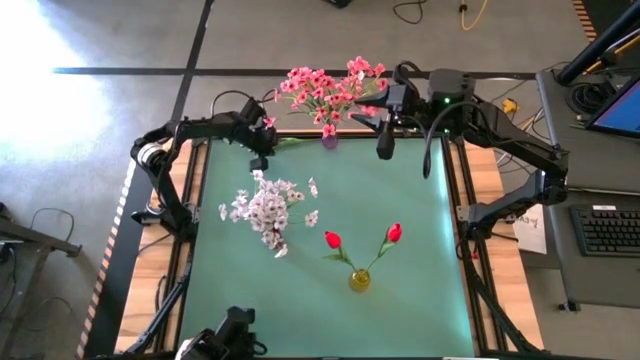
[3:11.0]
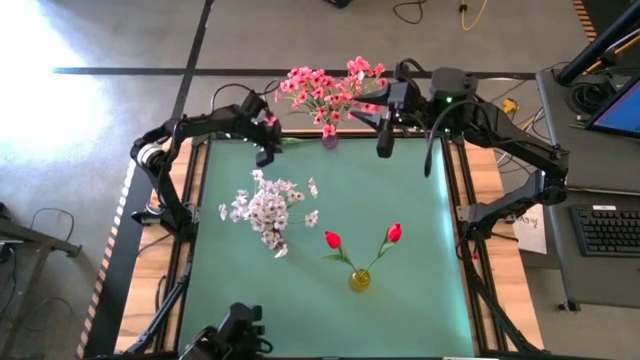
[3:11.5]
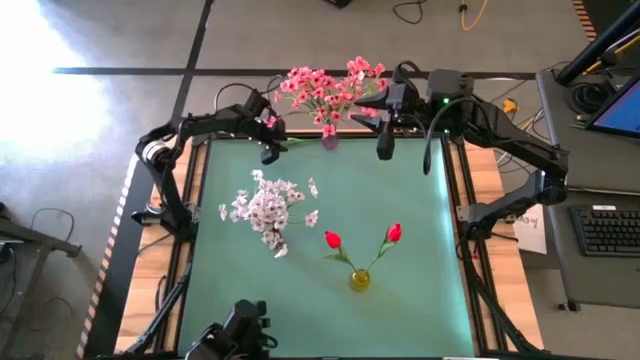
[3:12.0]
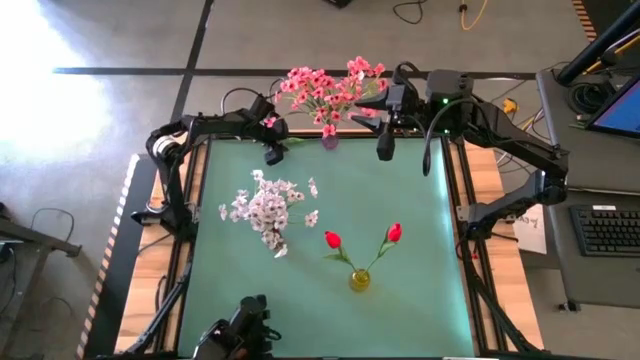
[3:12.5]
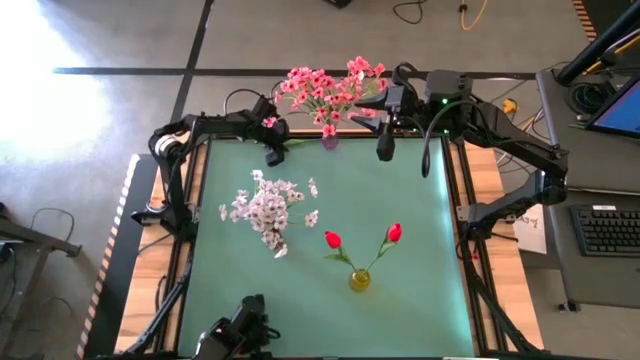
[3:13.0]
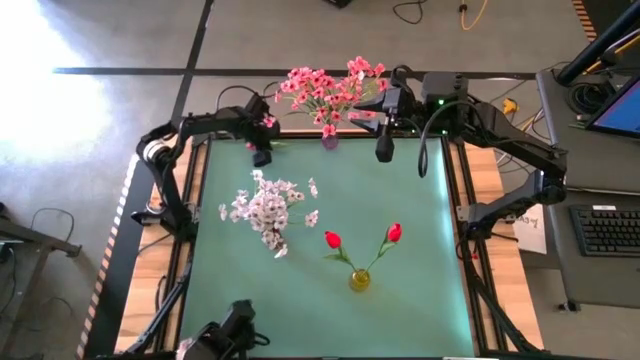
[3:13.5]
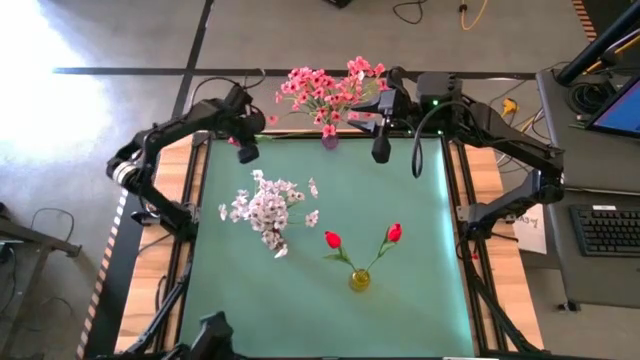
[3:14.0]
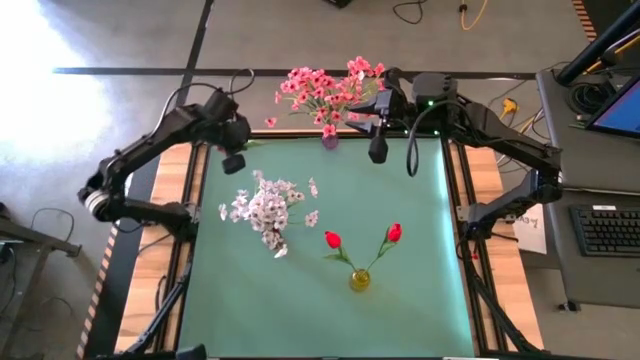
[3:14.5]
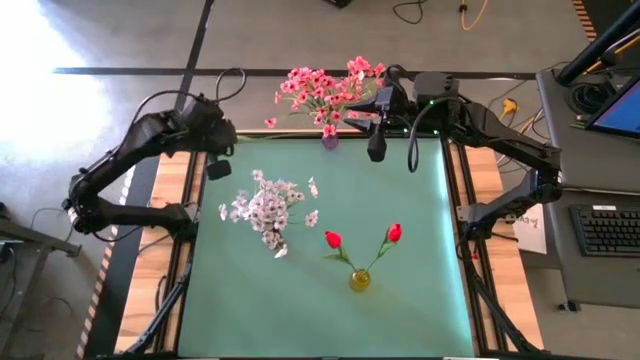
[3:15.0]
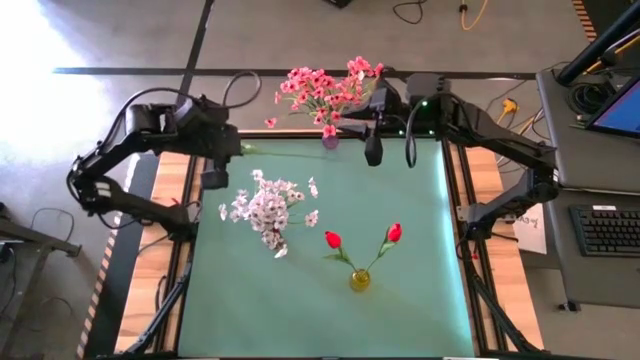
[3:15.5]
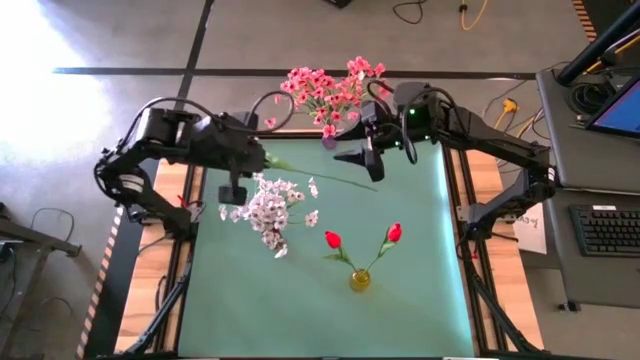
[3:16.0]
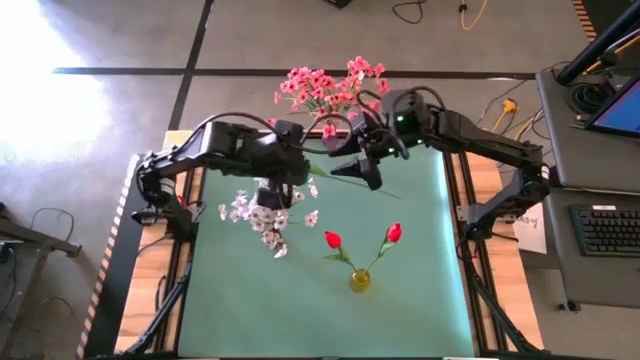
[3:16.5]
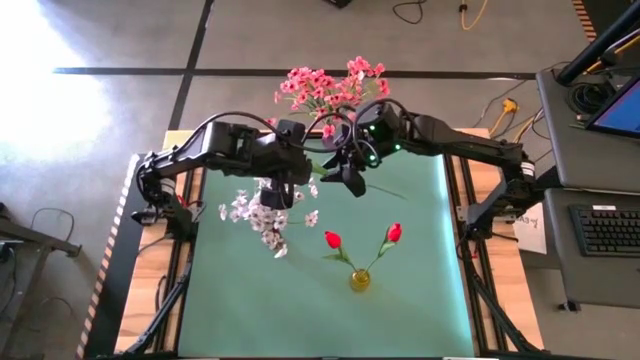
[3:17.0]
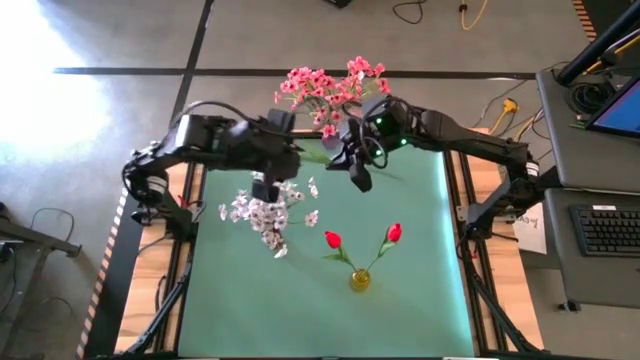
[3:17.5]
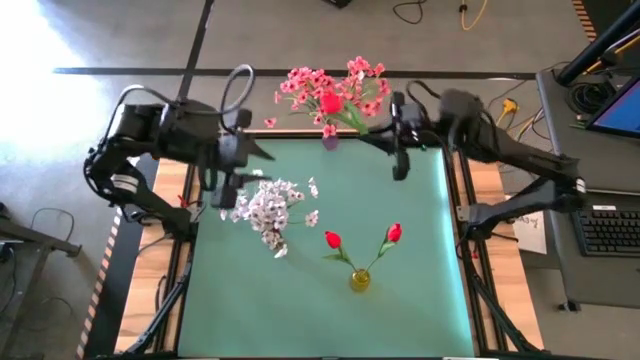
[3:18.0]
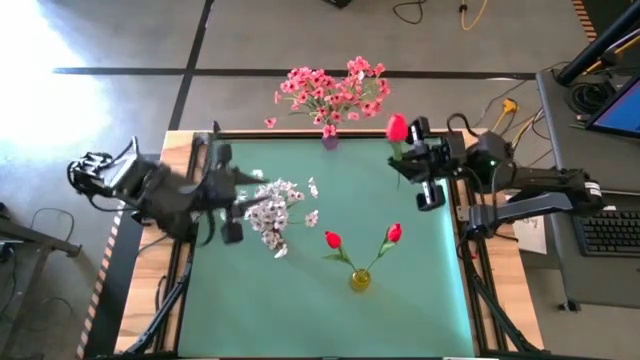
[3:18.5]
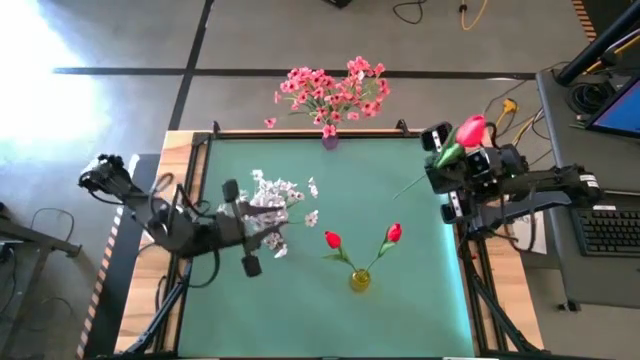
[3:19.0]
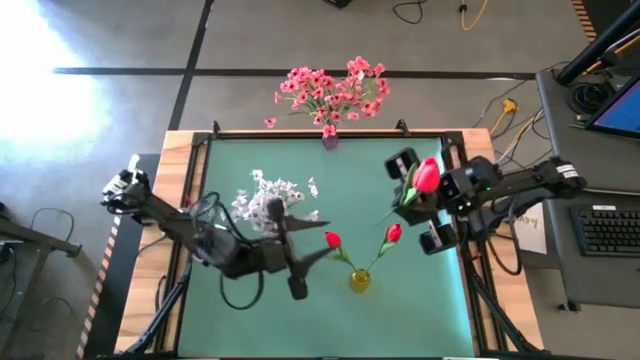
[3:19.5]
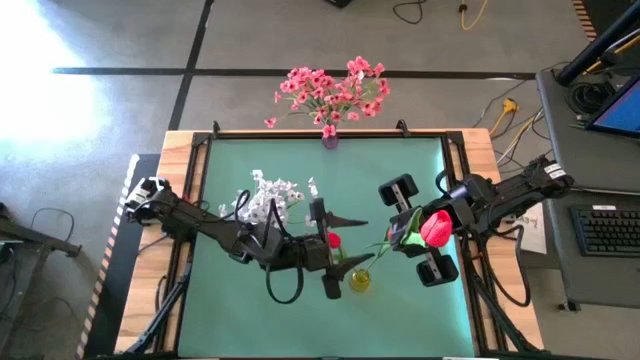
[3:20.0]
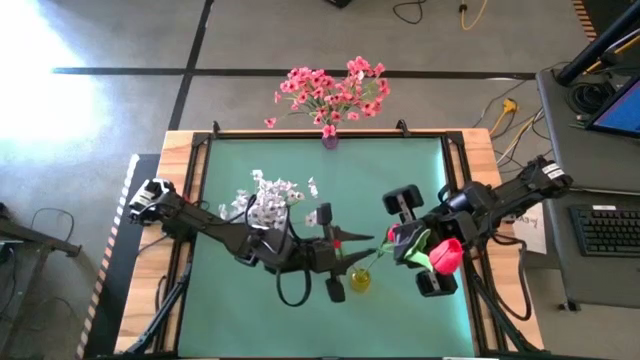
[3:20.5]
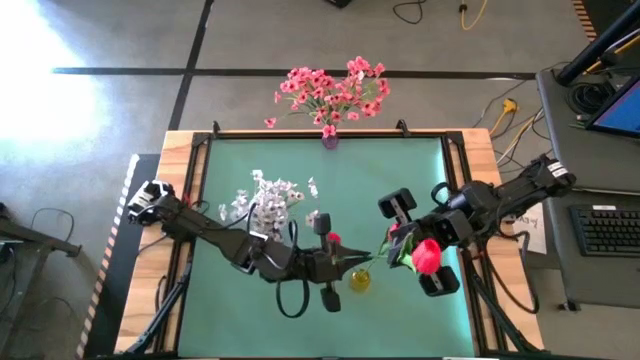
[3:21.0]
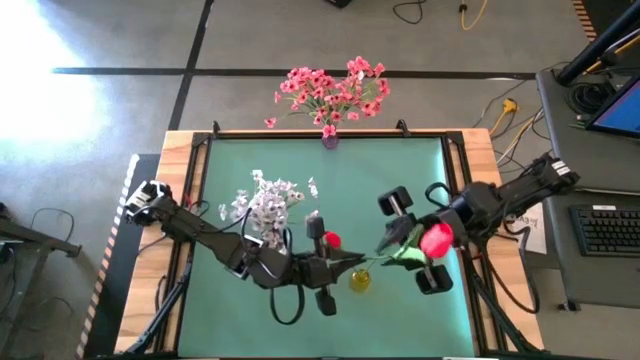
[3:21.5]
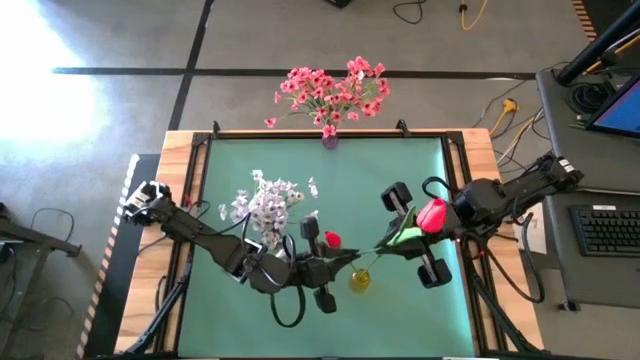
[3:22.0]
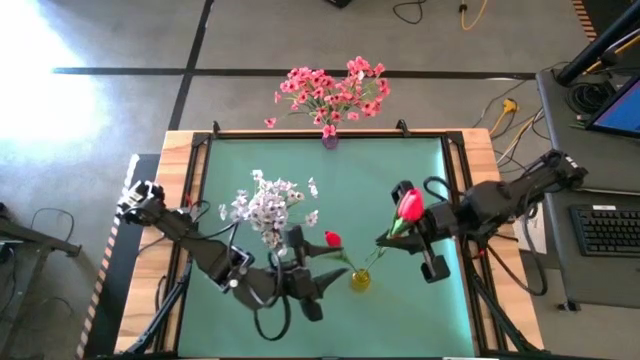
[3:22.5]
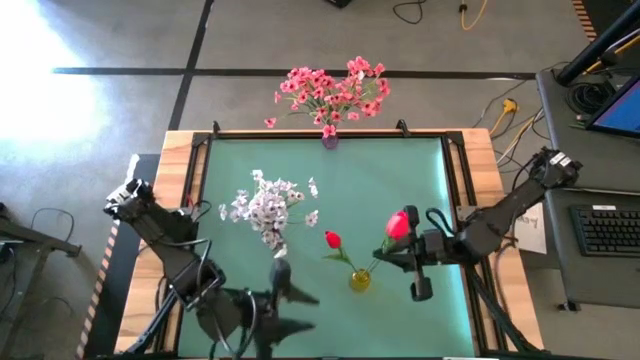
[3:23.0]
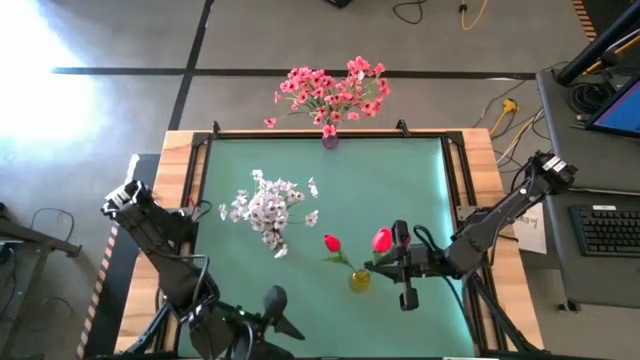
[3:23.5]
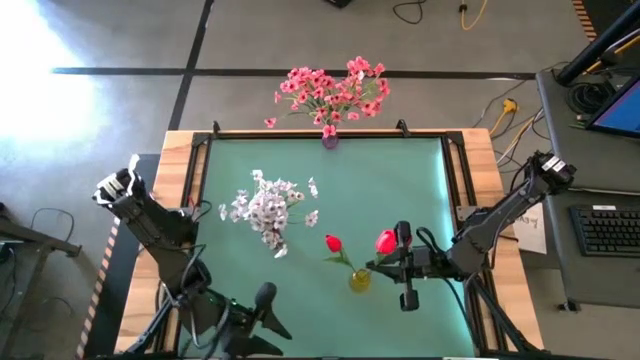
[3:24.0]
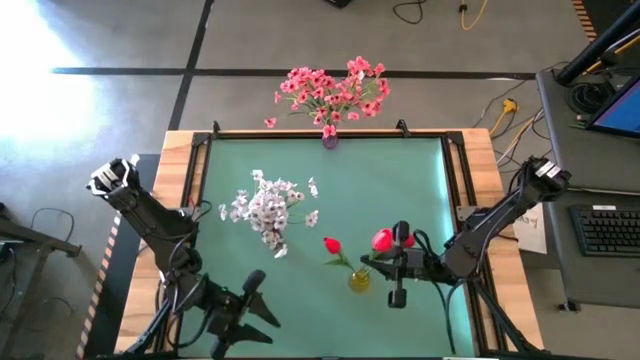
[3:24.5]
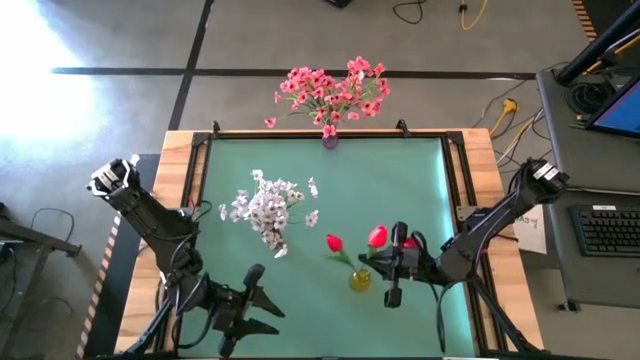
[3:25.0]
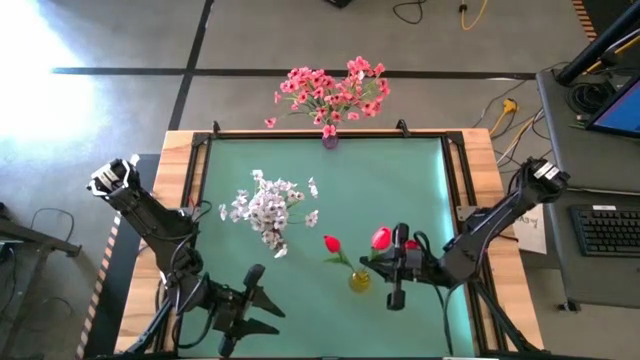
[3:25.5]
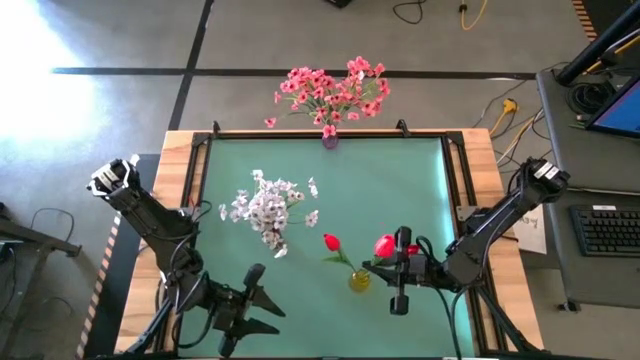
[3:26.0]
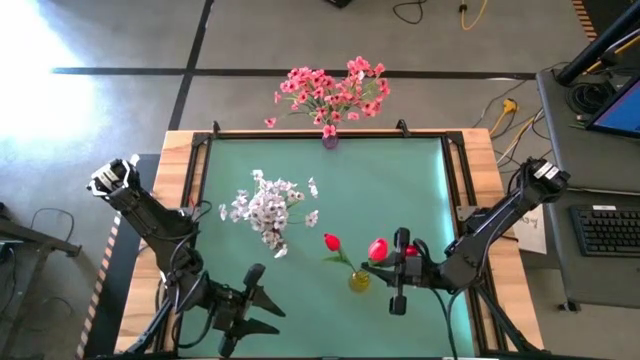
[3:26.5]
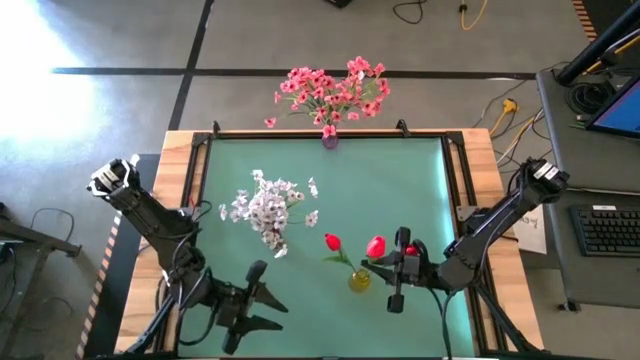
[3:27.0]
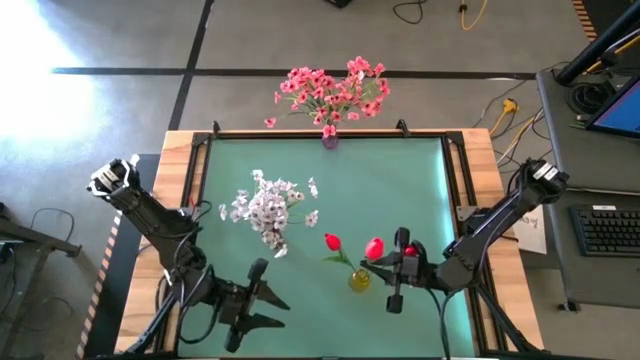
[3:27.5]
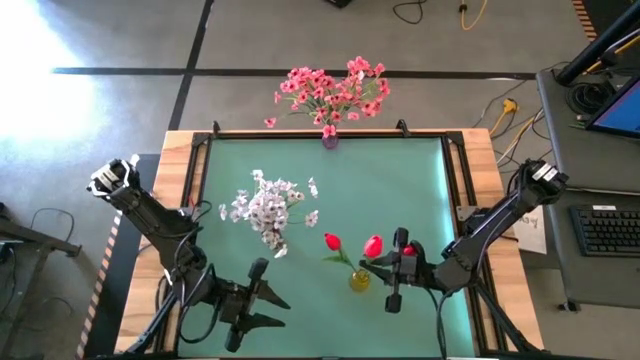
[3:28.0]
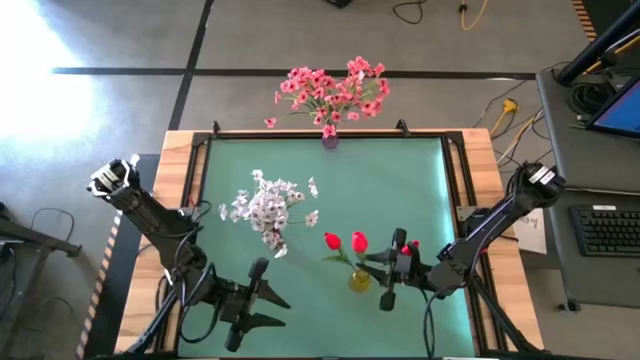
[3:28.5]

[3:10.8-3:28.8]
Task: Sort flowers into vase by color
Put the red tulip into the yellow flower vase

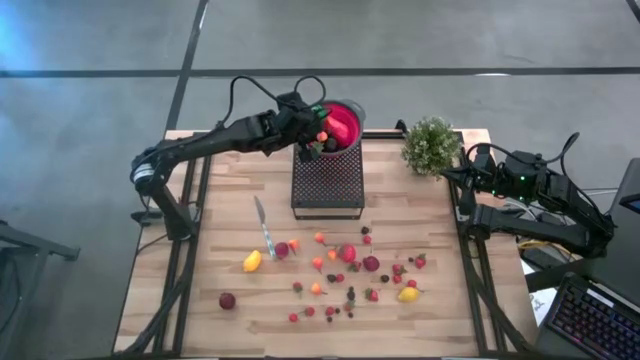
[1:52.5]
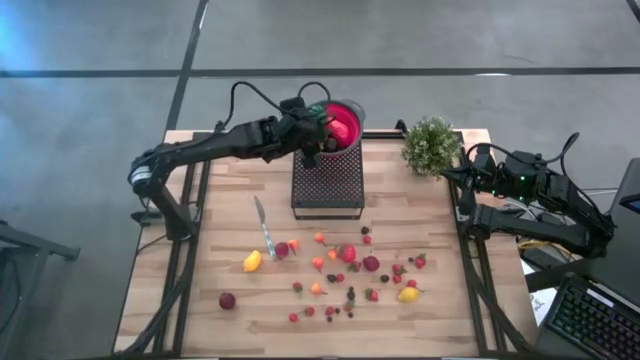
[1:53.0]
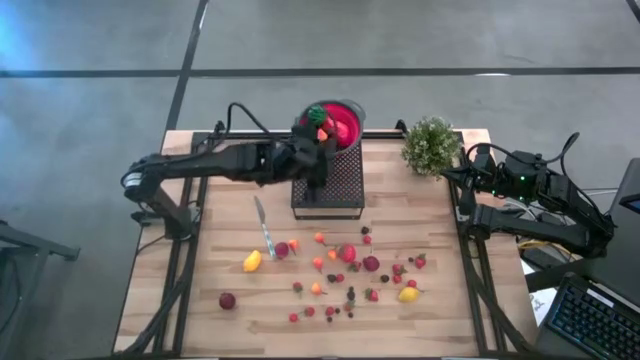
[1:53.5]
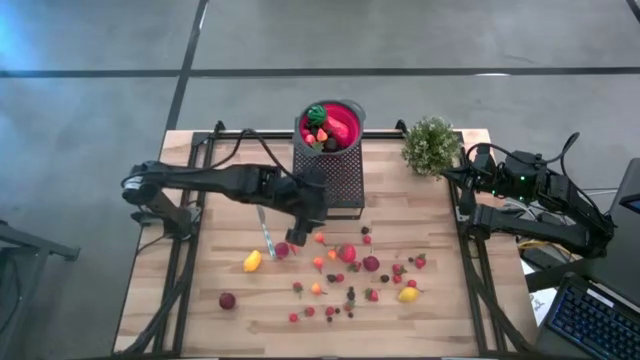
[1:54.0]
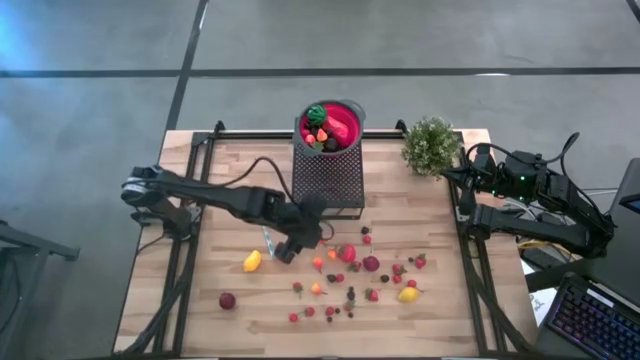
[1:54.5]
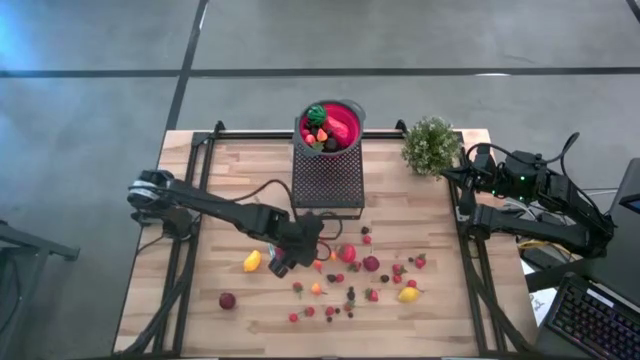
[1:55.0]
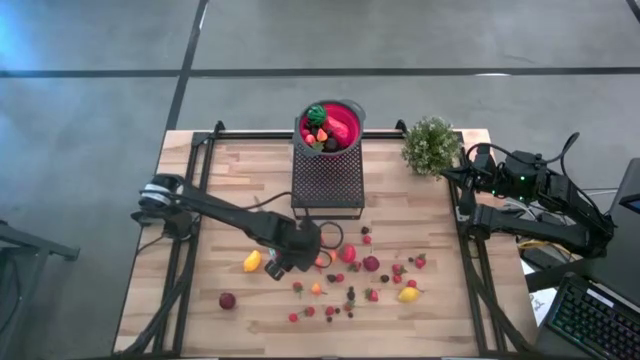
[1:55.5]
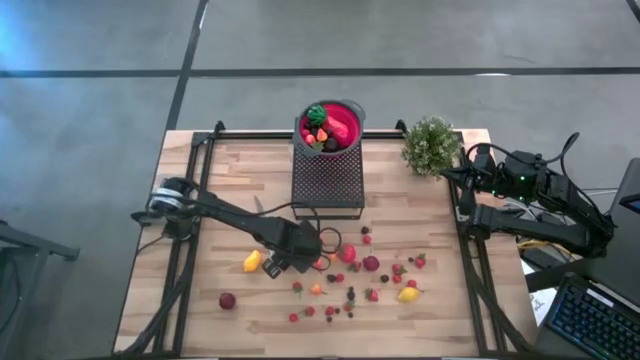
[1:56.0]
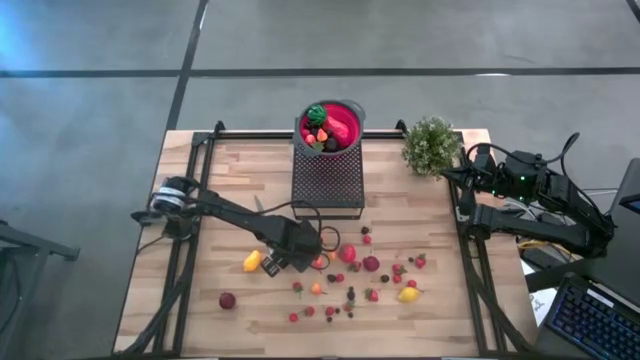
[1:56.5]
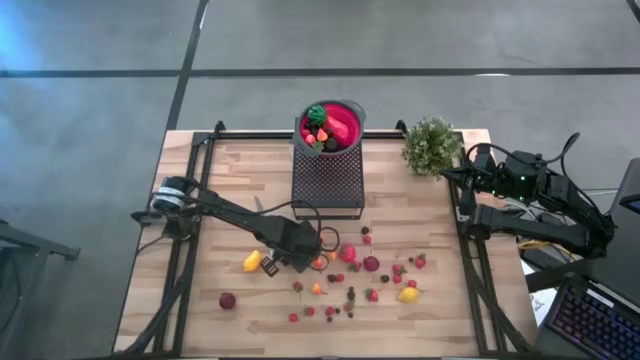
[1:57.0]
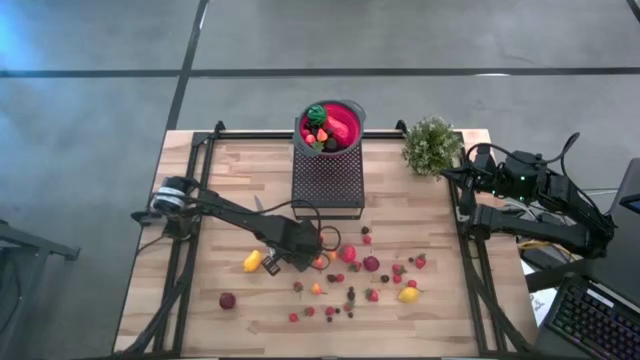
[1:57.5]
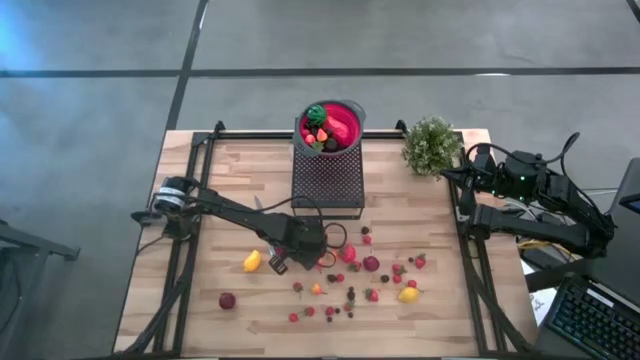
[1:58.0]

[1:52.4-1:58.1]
Task: Pick & Place Fruit
Put the pear into the strainer bowl on the shelf
